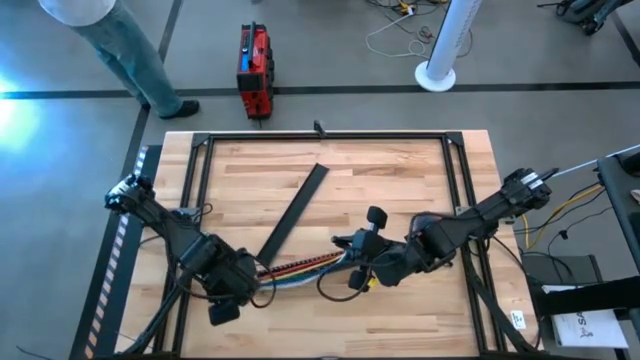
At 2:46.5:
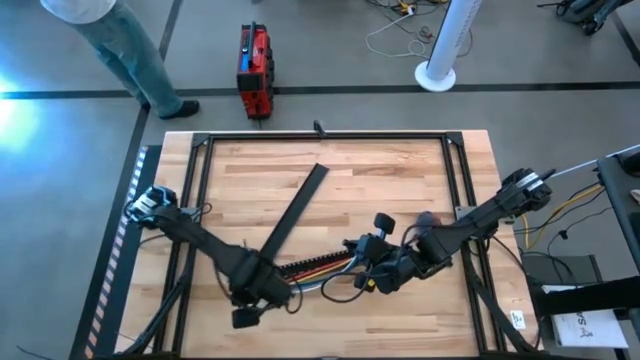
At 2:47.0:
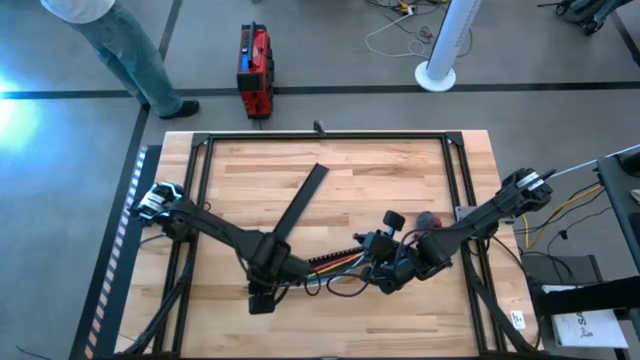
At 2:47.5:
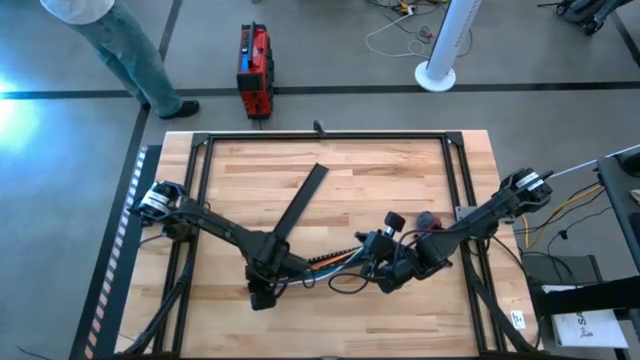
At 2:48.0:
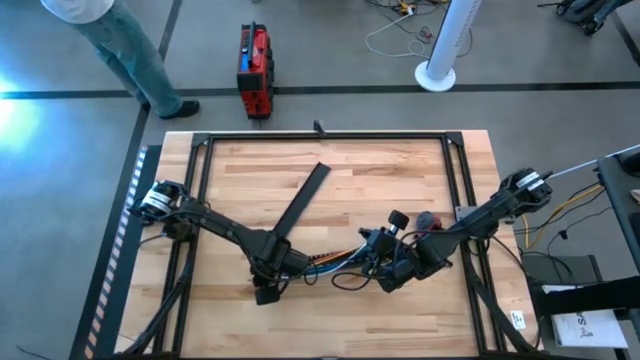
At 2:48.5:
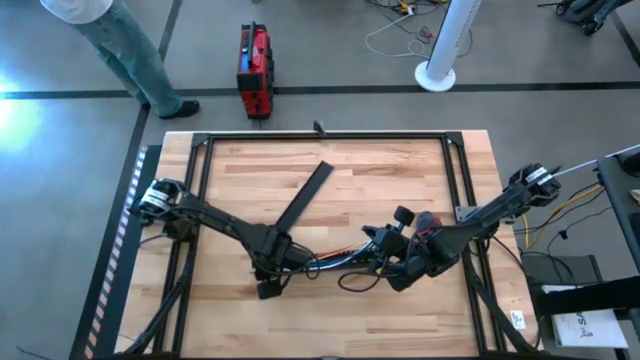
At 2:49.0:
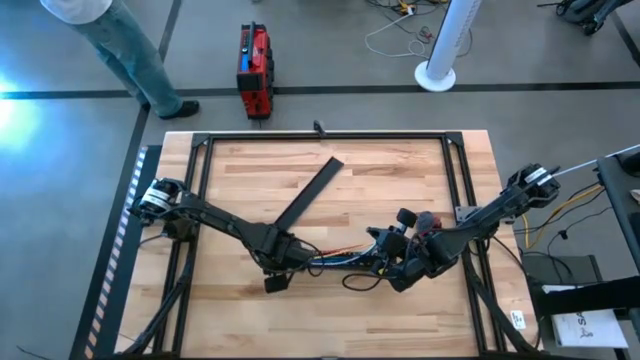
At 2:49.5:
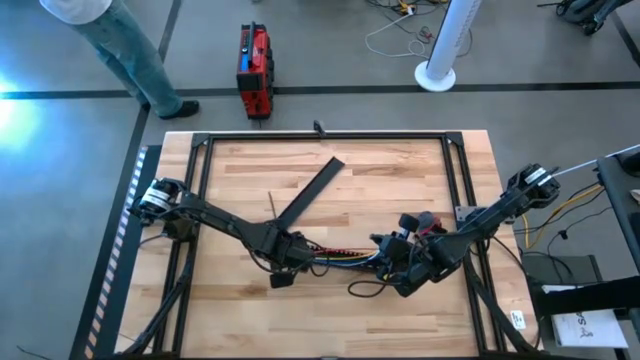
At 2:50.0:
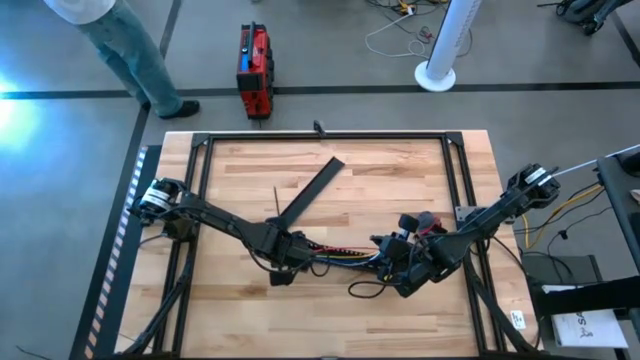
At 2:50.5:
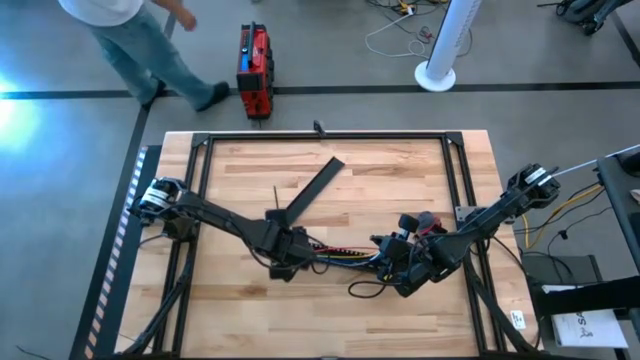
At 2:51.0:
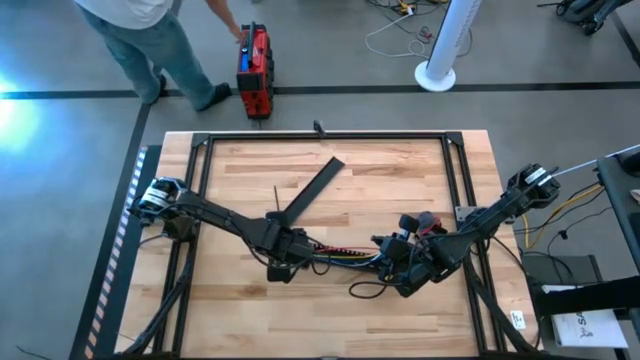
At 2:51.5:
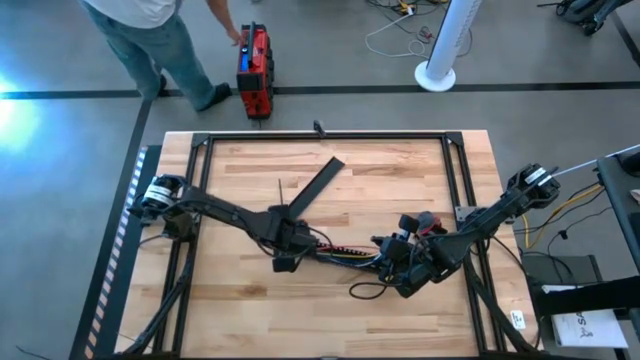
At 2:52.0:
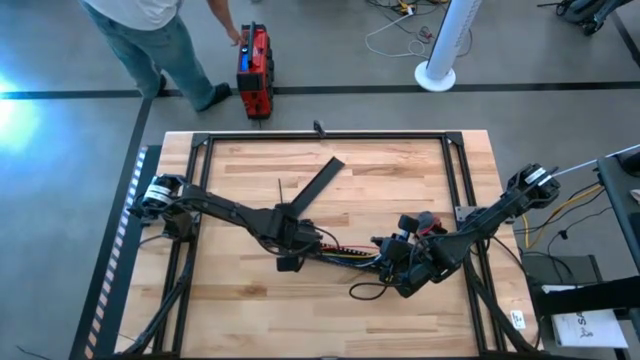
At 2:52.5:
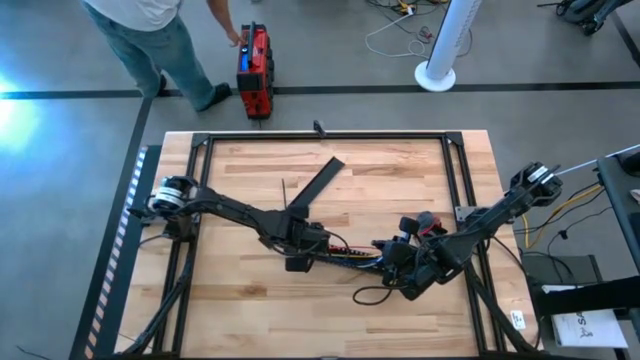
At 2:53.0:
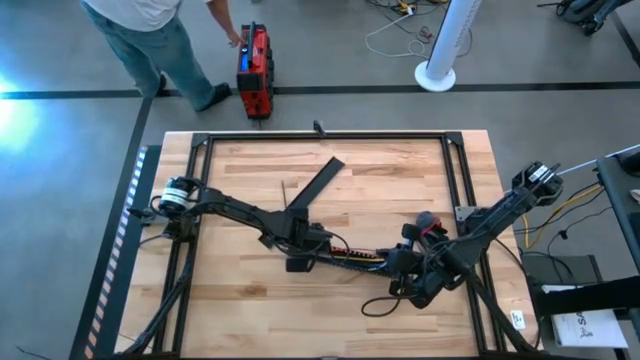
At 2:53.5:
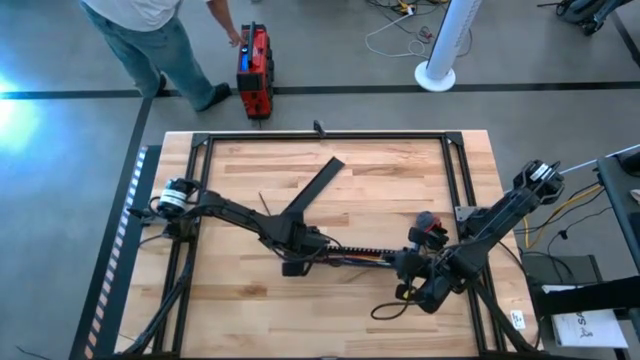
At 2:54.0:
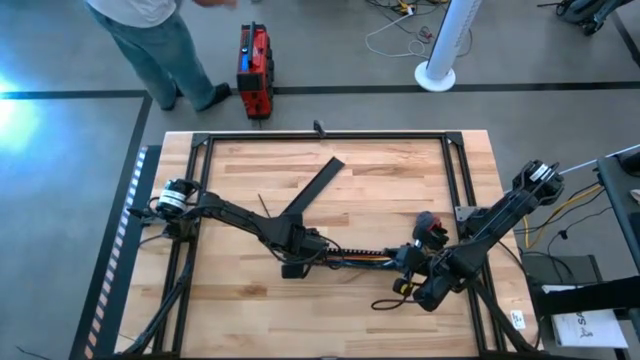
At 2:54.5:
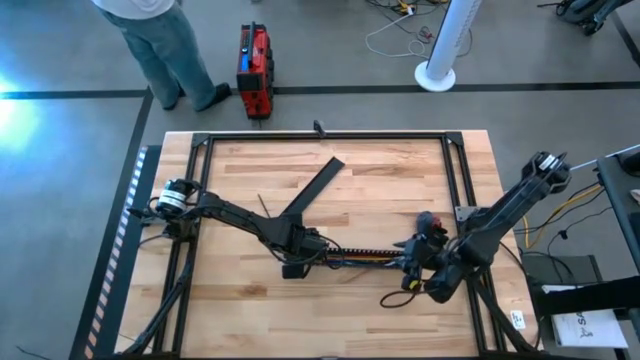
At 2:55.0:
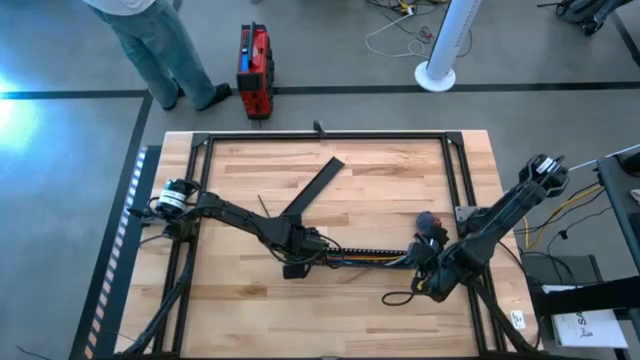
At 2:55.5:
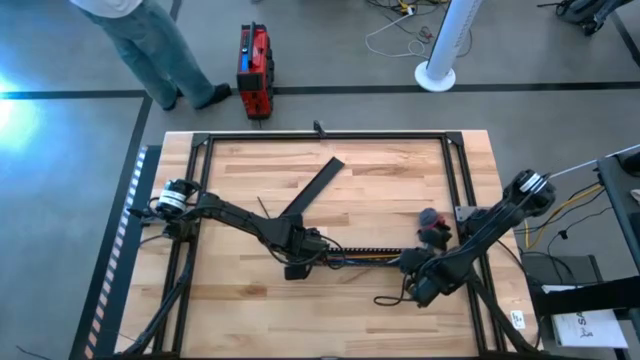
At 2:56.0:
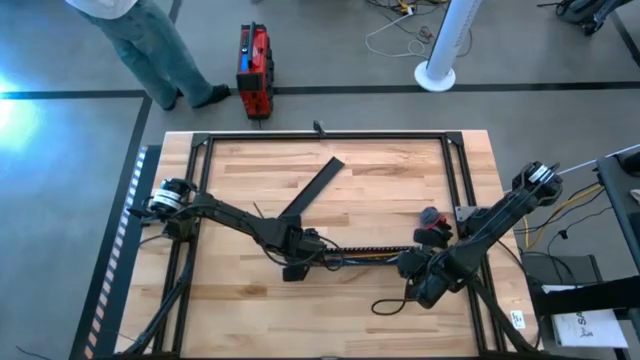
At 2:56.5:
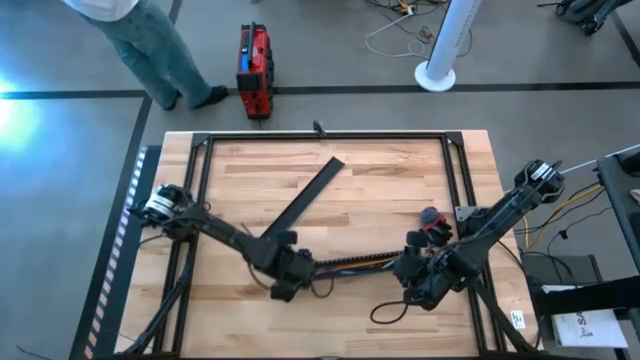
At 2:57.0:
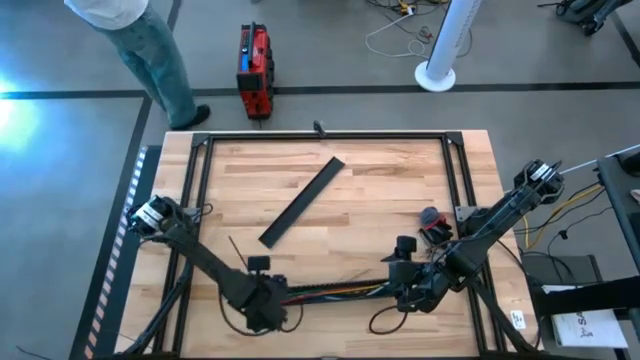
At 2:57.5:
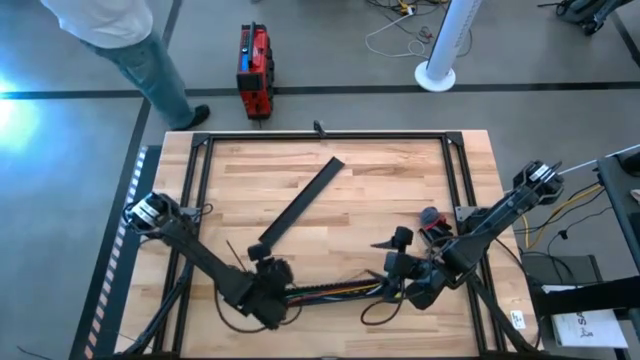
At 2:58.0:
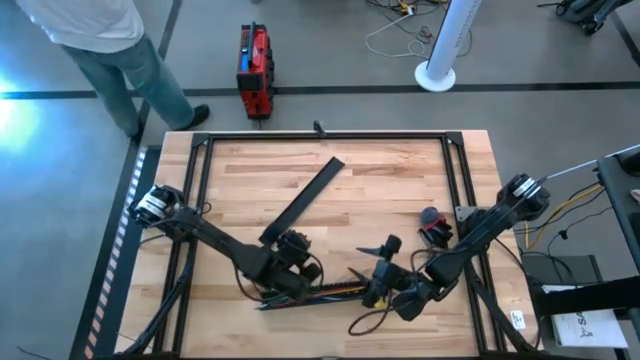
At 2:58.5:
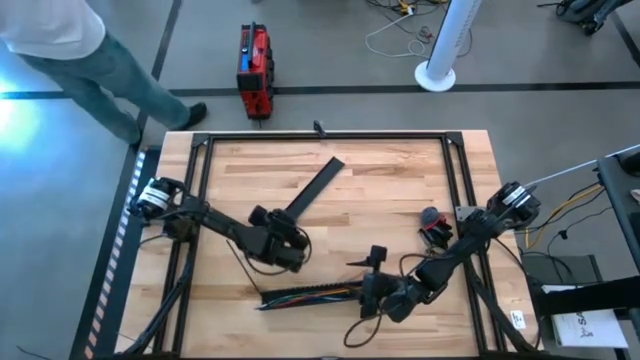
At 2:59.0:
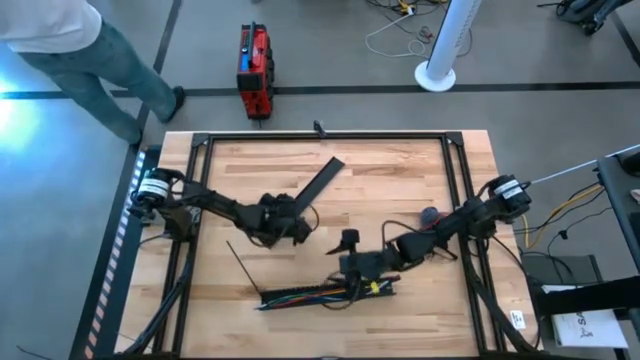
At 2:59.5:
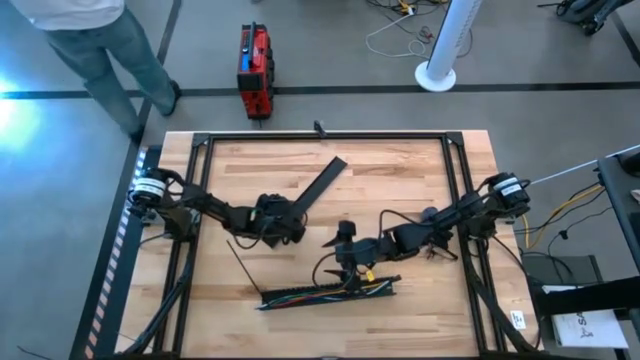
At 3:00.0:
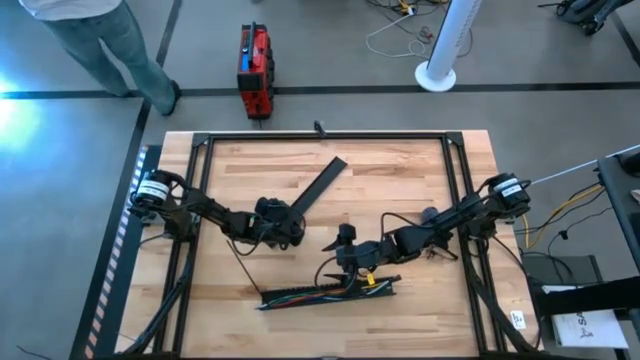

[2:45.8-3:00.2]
Task: Ziptie cables
Put the wrapped cable wires into the cable duct

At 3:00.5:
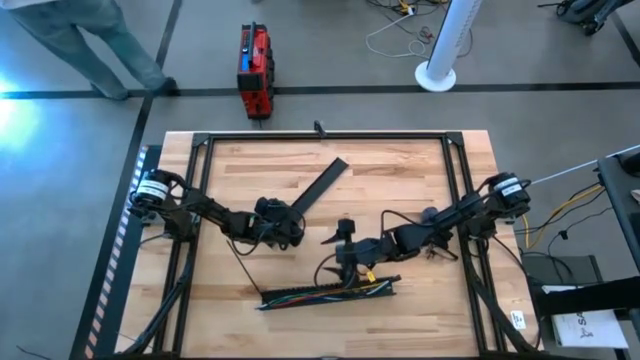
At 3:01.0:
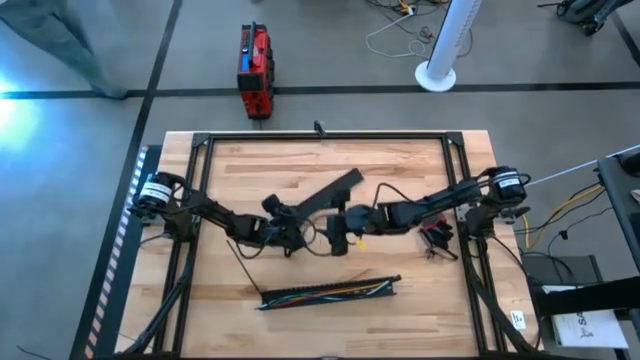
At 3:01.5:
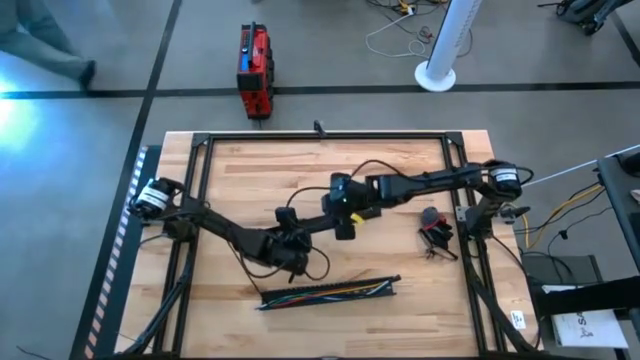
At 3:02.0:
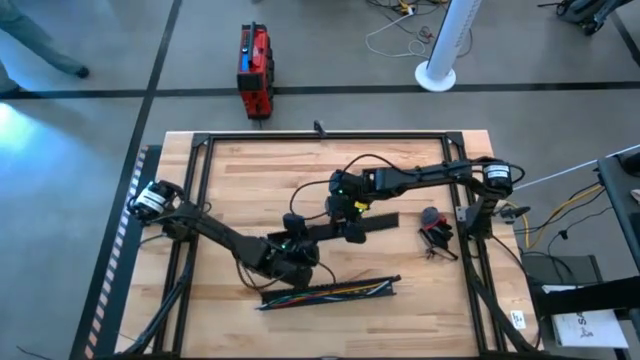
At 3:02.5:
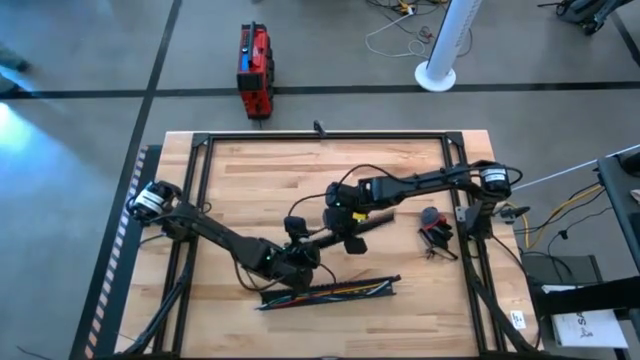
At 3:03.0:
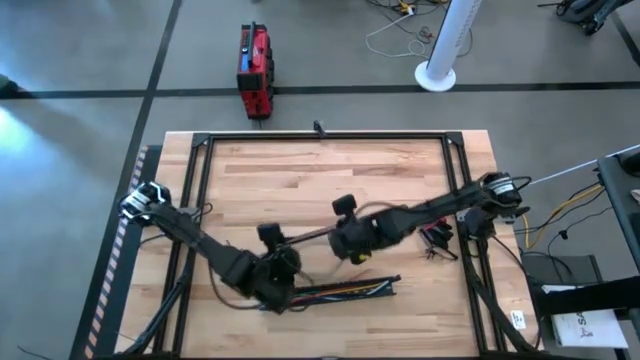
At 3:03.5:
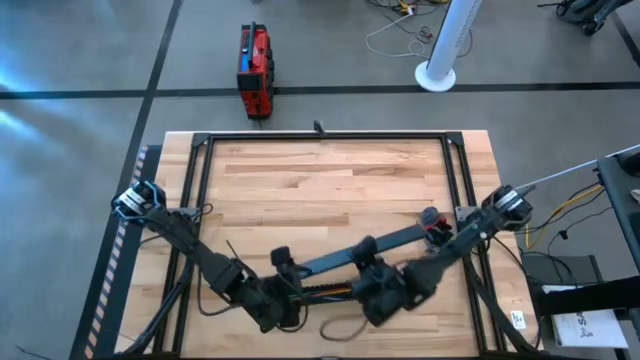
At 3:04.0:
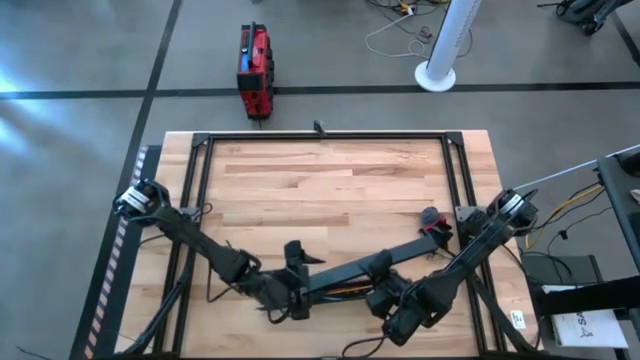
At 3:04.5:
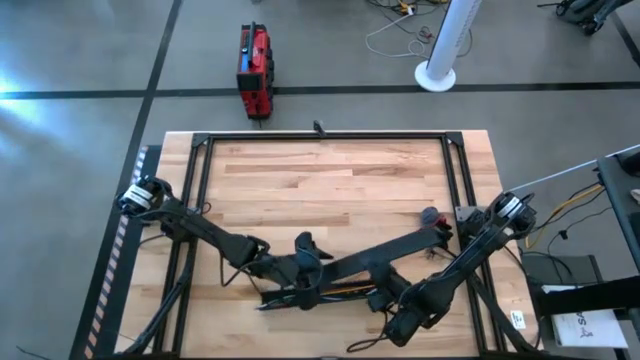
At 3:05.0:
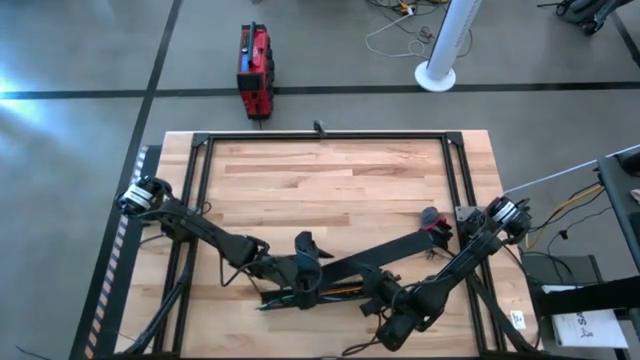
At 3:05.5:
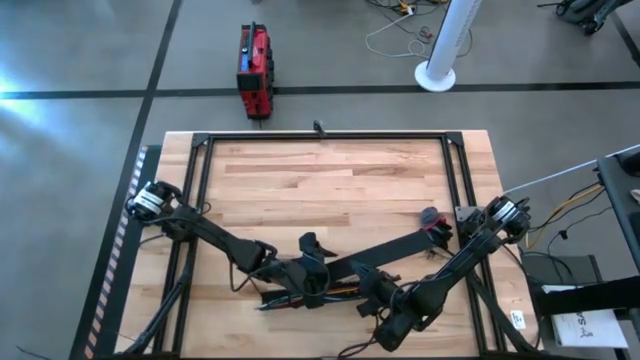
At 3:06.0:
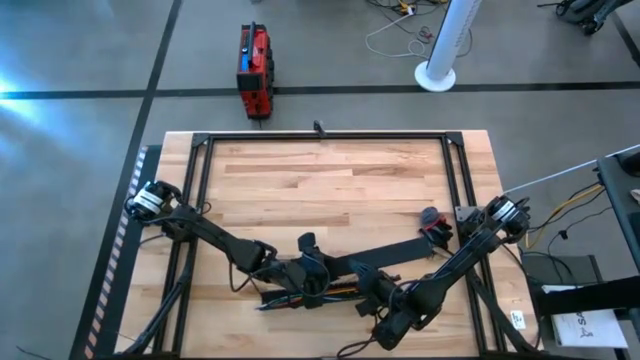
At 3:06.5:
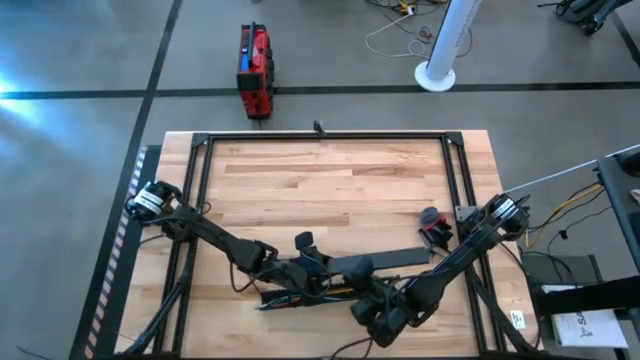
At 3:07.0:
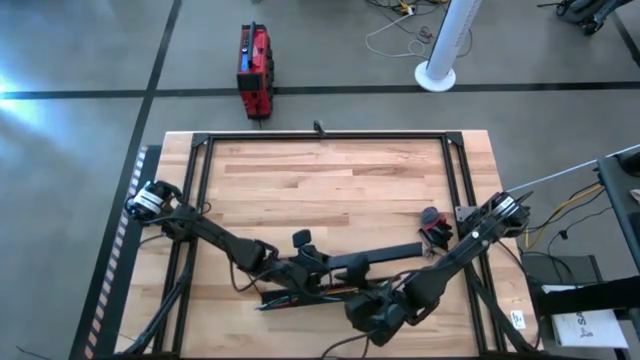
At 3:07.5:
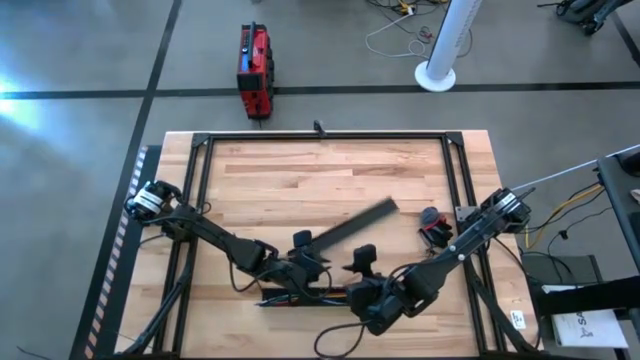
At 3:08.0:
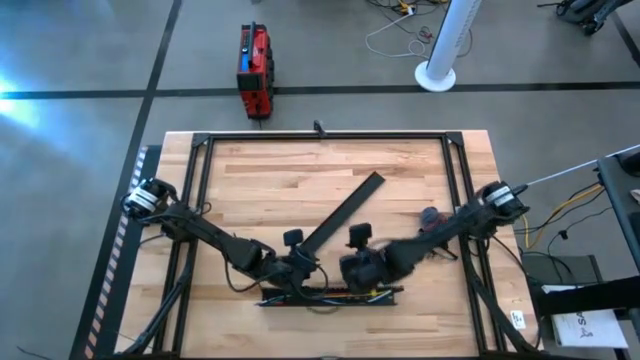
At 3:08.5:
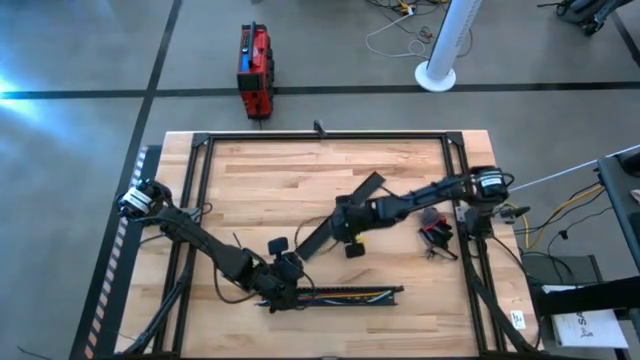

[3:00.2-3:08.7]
Close the cable duct using the cable lid
